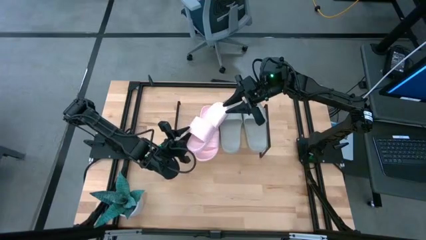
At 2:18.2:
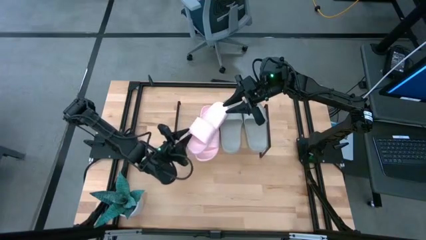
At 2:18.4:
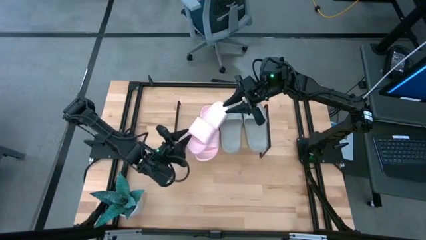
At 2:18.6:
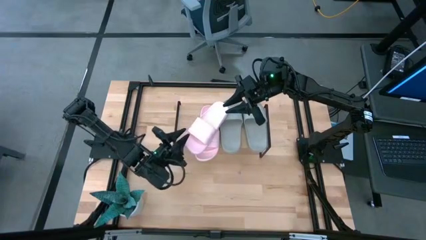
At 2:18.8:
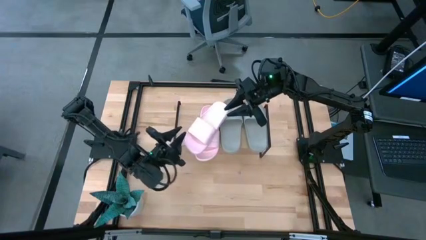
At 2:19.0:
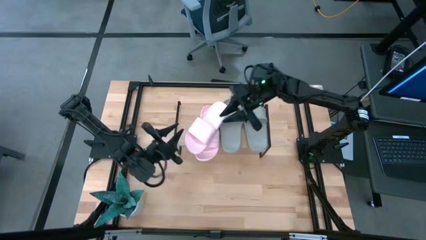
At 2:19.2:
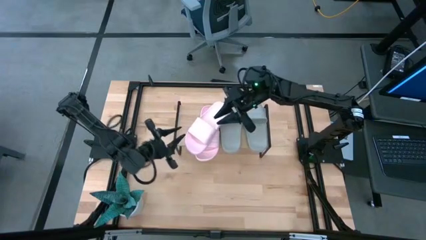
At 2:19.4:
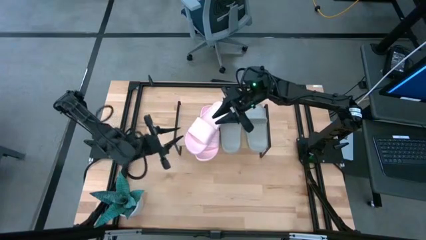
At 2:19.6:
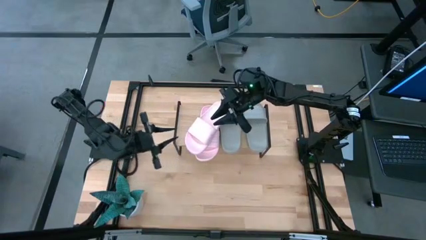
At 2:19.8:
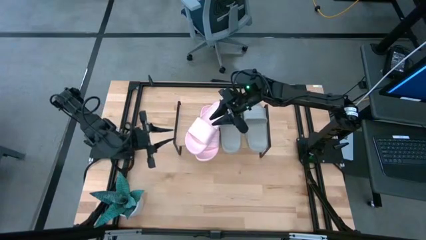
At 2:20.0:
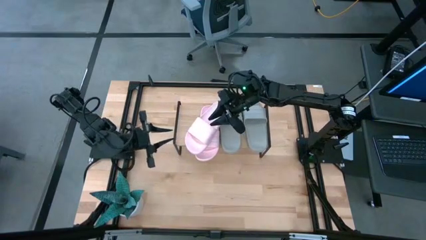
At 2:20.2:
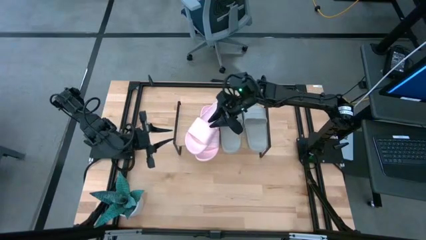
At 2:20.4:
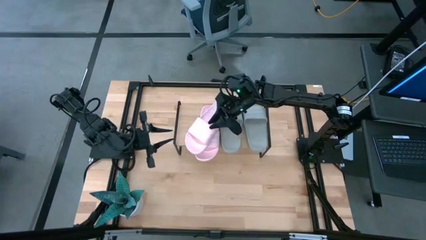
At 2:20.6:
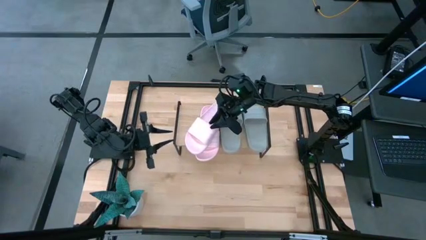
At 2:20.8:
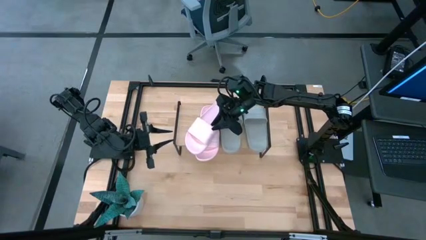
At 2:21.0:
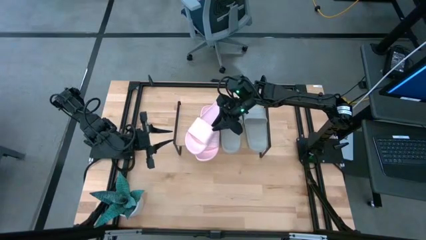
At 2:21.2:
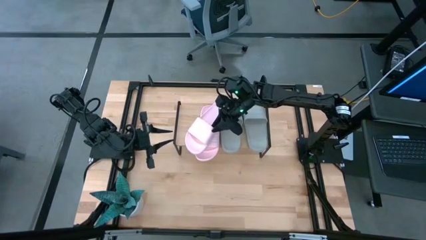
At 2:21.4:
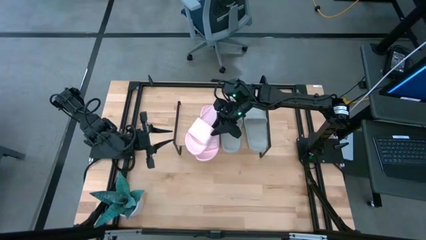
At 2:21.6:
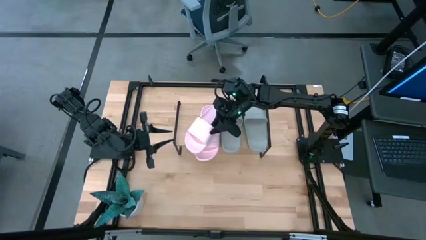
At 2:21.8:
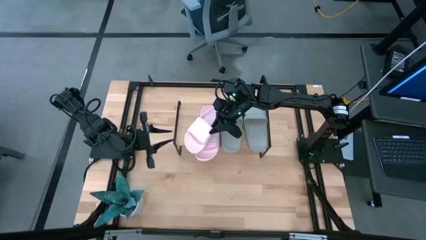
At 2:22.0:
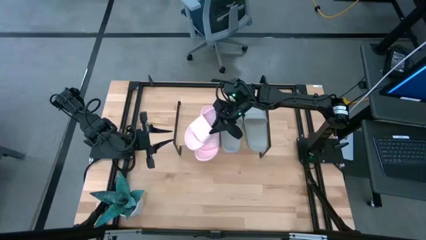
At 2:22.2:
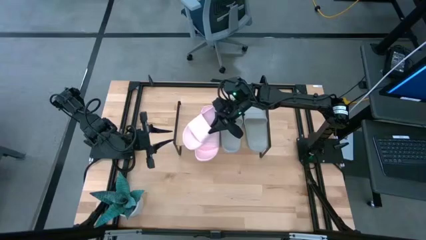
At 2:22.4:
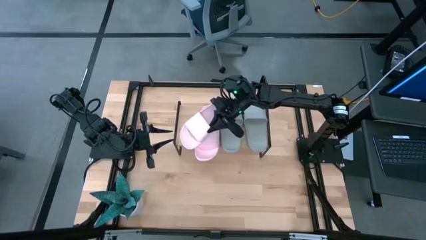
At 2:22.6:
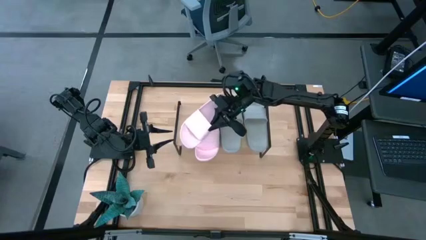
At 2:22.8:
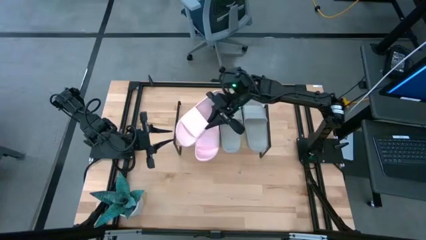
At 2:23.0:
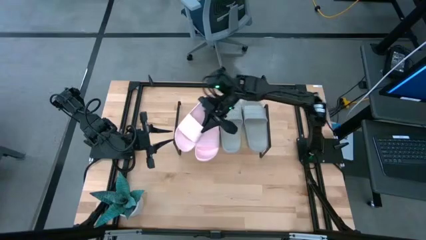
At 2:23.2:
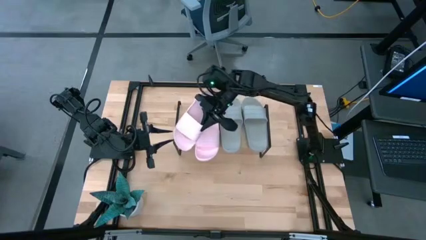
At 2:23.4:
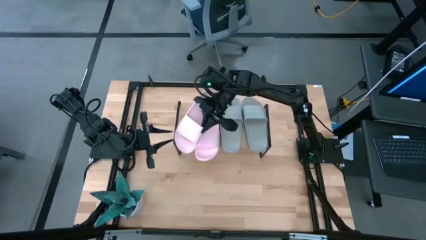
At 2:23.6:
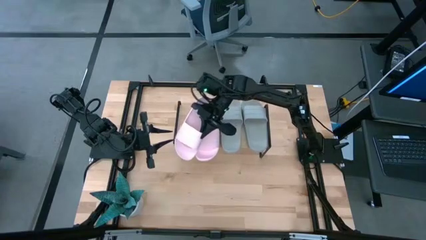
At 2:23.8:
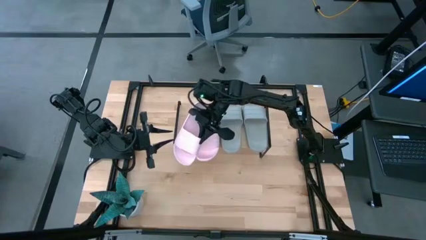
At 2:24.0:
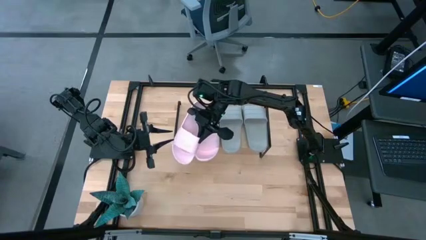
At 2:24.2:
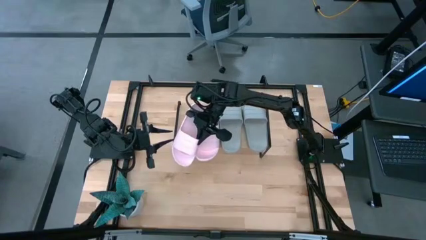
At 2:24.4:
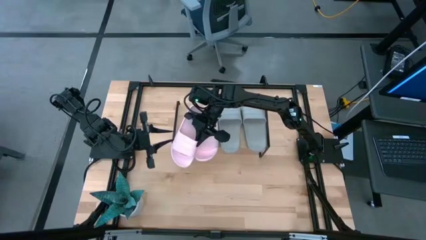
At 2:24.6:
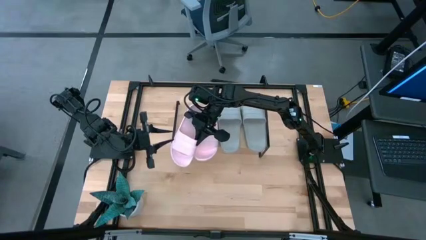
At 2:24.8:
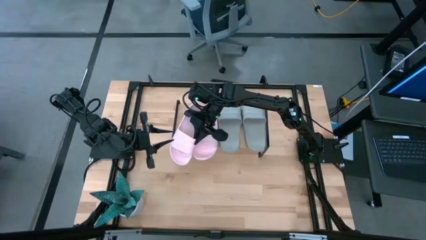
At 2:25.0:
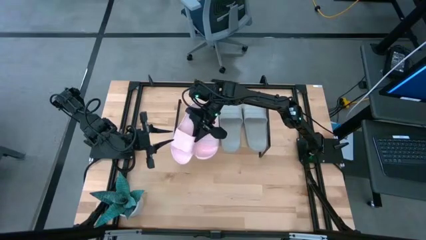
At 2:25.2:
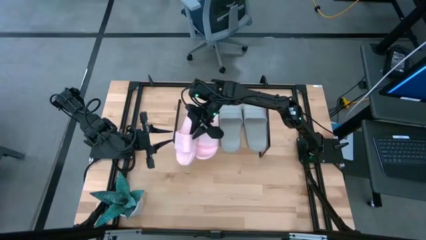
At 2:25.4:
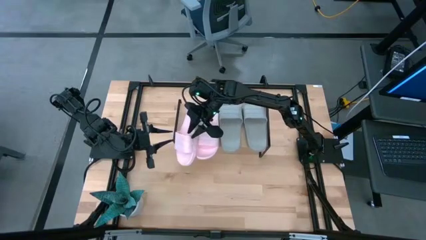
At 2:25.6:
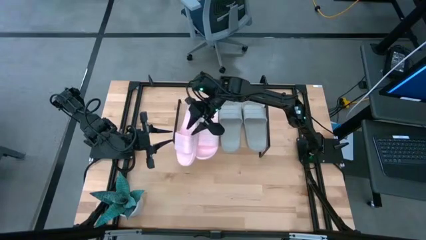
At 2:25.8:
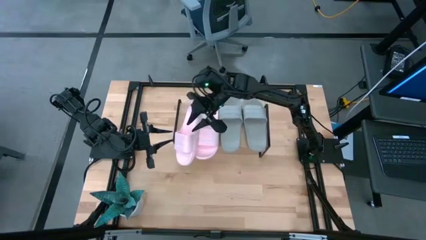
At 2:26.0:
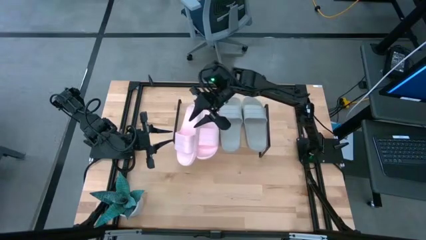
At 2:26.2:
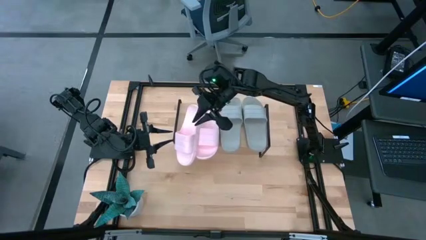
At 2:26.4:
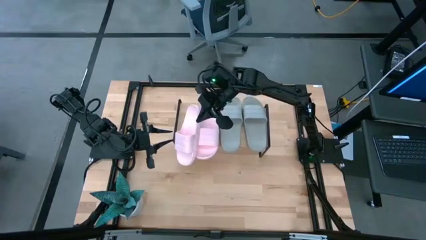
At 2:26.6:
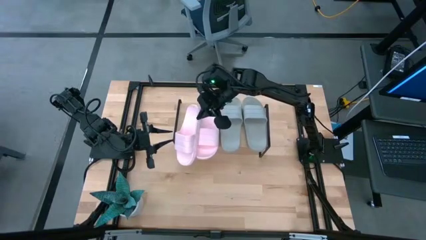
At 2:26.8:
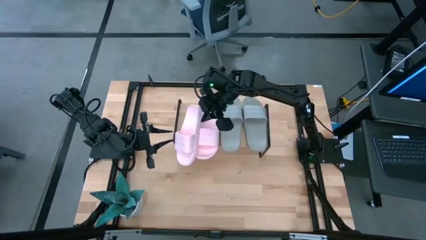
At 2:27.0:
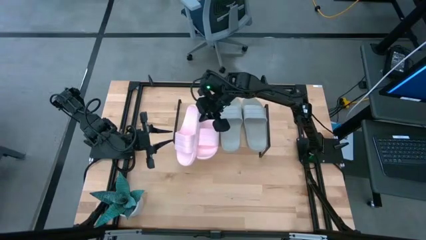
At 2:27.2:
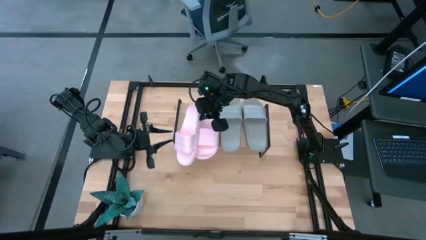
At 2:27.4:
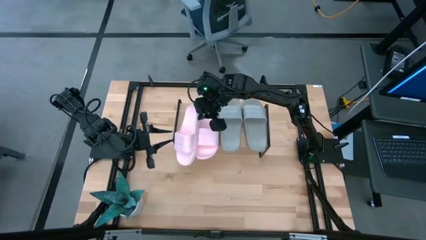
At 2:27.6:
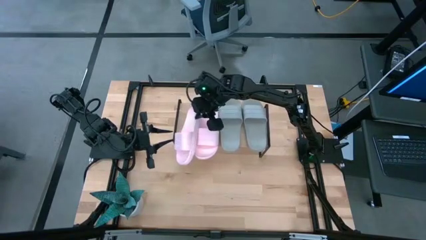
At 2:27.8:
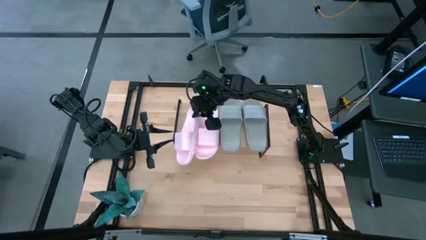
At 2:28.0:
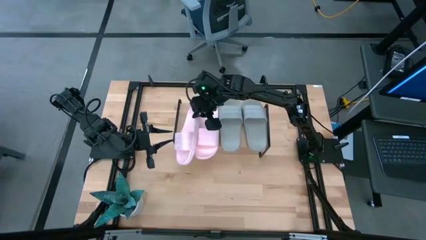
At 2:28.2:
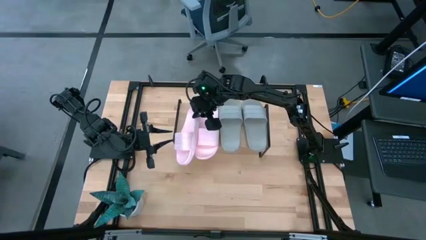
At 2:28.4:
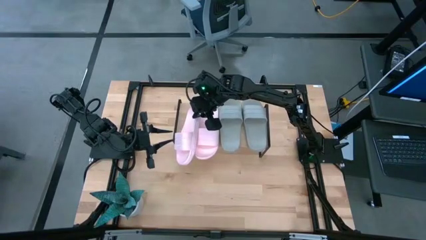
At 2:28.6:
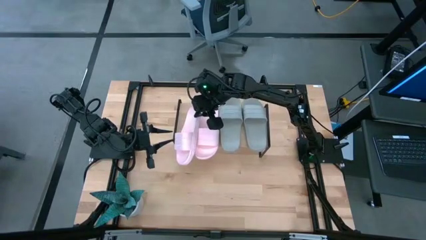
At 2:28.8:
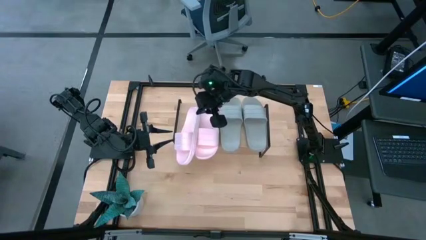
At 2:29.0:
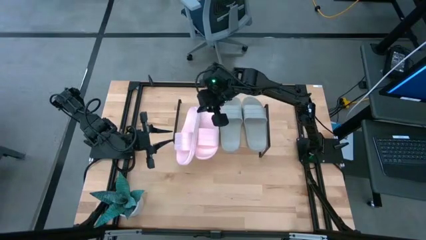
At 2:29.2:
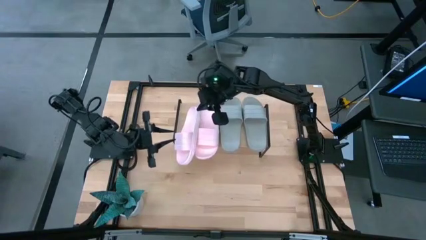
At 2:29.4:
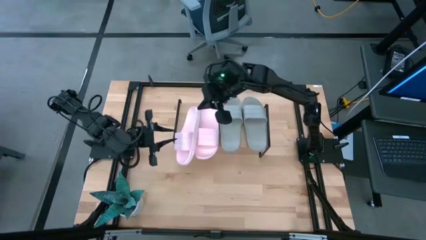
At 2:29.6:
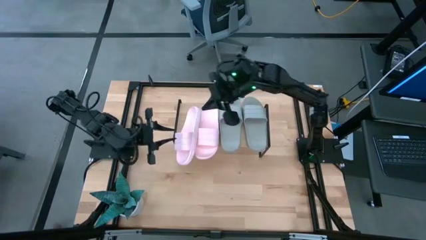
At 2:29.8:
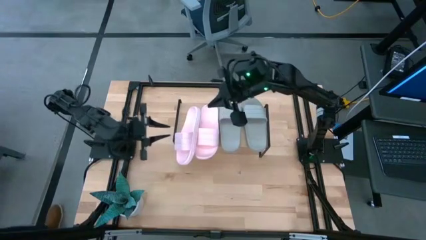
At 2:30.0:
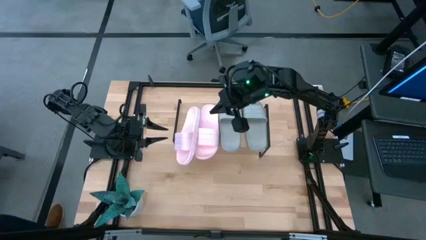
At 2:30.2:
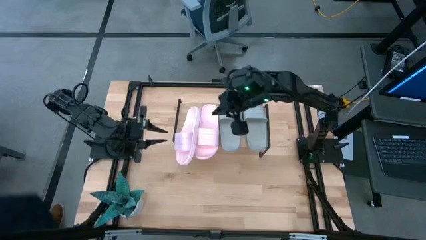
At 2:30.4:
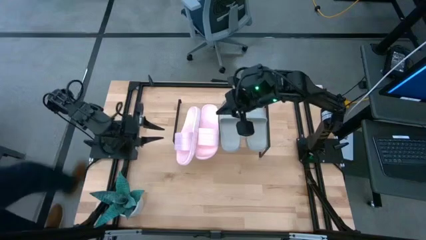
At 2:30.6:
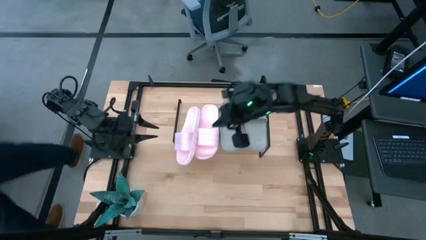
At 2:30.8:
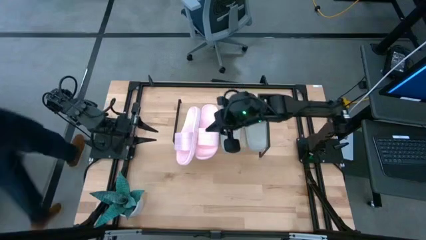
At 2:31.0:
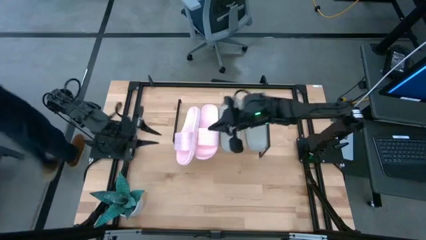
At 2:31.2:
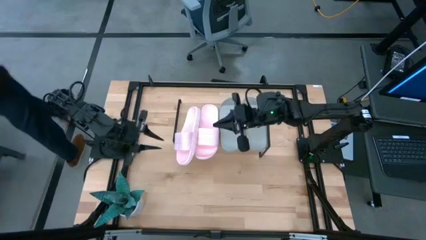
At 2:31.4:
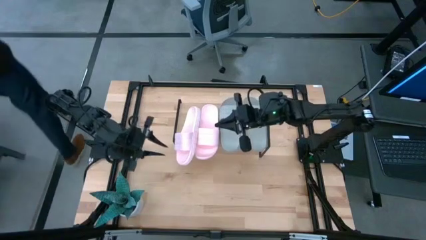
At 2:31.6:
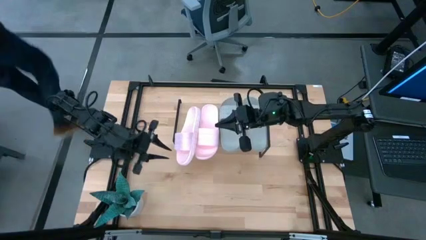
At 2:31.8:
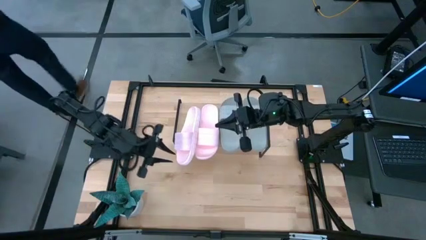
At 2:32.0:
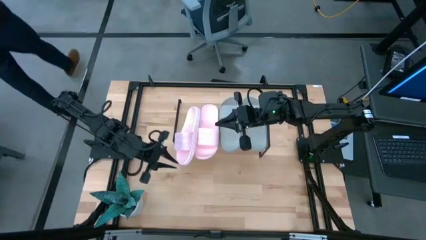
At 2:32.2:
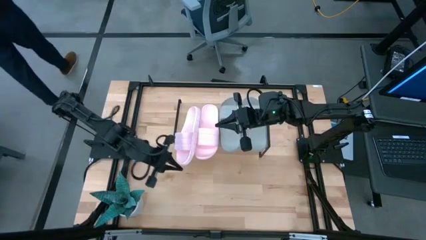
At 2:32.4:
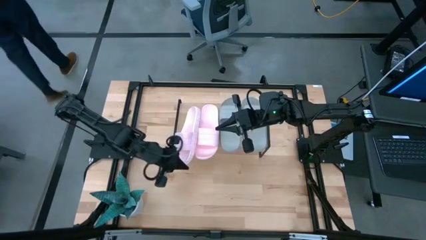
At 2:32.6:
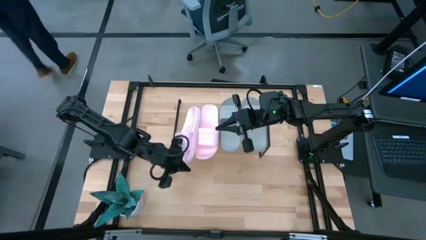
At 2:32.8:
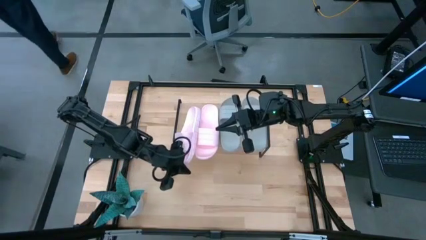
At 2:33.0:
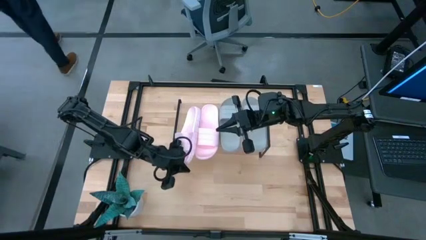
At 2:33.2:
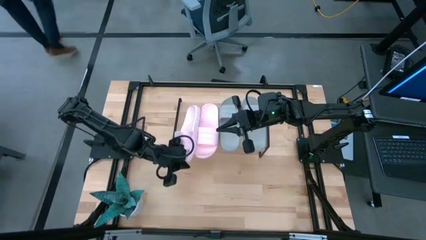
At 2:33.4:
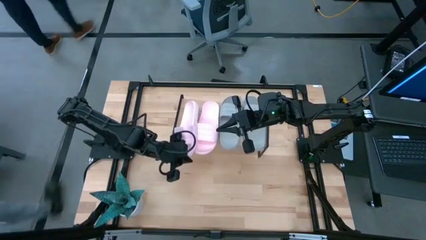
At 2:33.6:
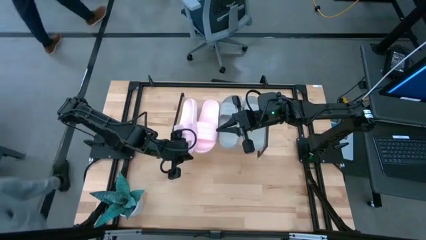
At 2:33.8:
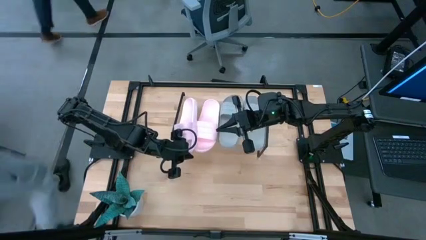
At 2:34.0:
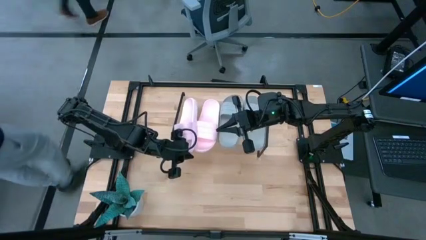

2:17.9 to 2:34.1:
Task: Pick and place slides into the shelf
Put the pink slide on the shelf
